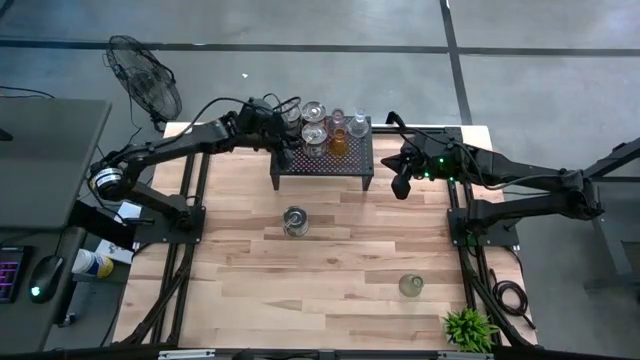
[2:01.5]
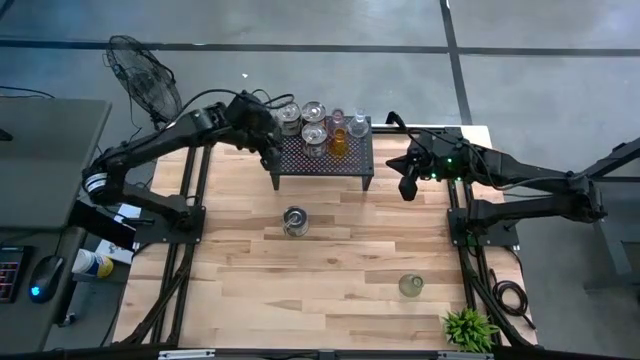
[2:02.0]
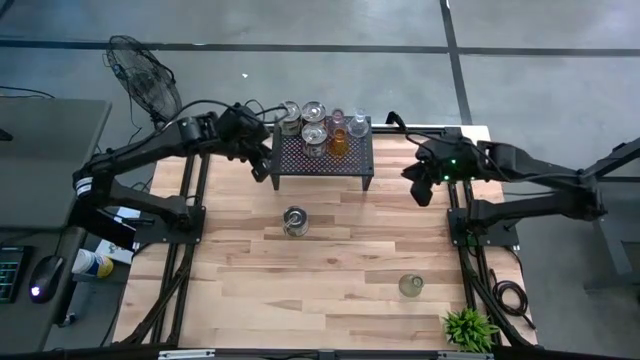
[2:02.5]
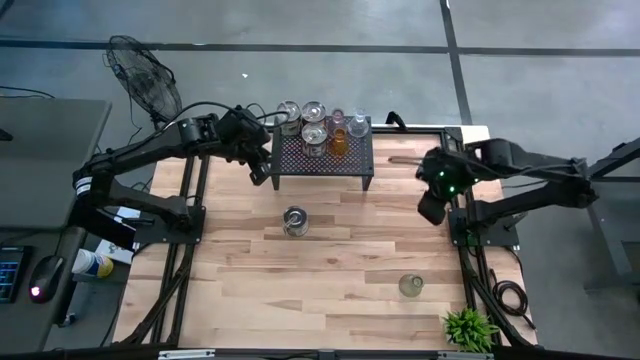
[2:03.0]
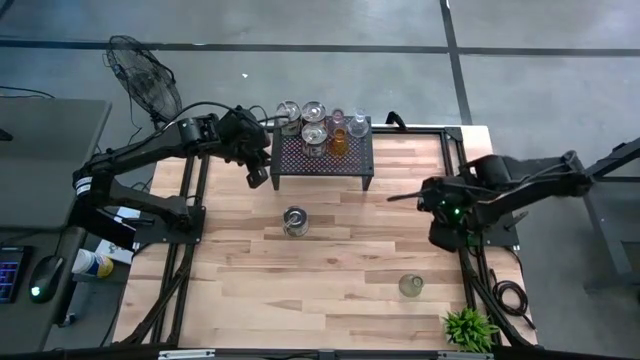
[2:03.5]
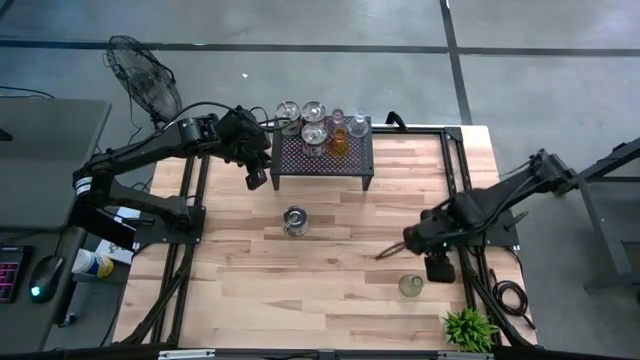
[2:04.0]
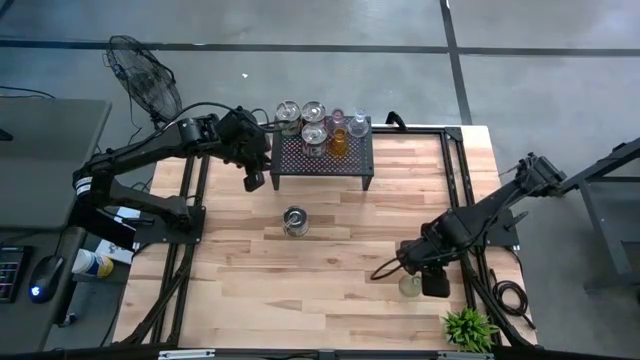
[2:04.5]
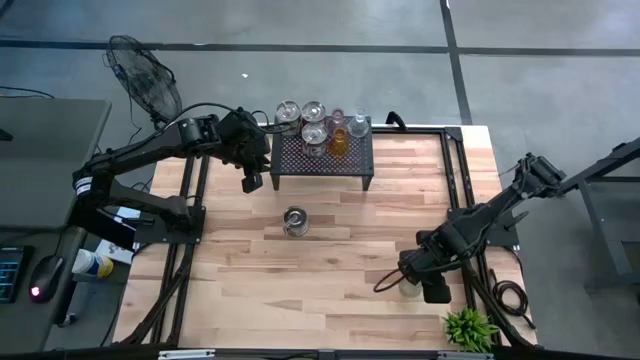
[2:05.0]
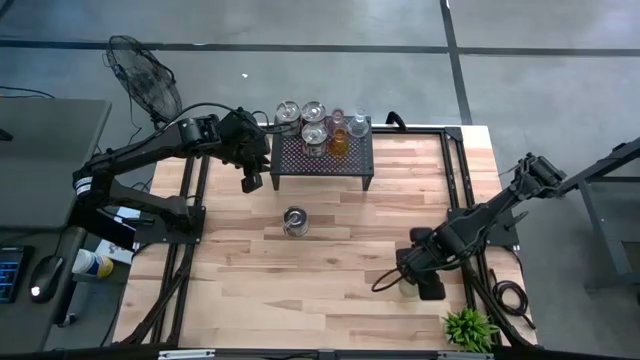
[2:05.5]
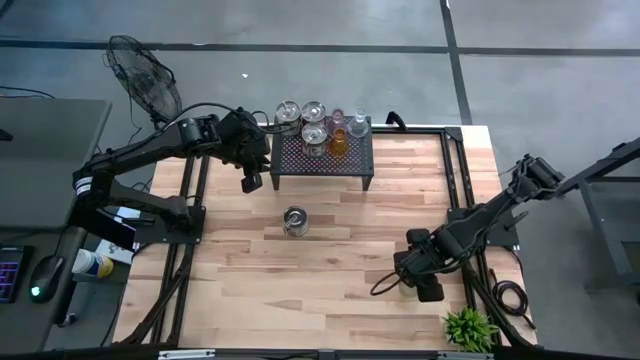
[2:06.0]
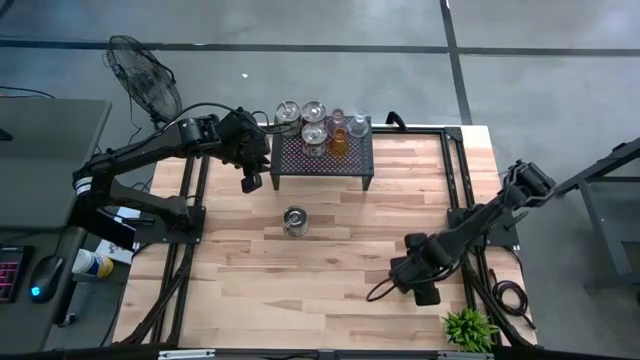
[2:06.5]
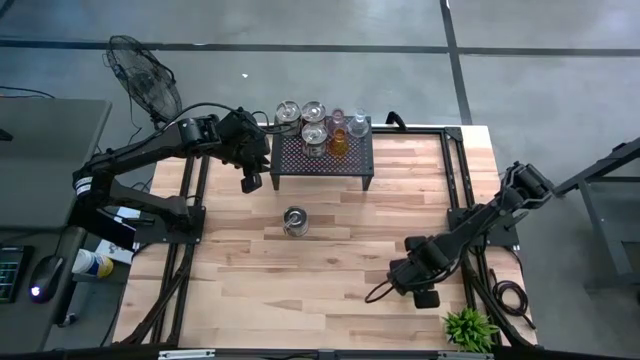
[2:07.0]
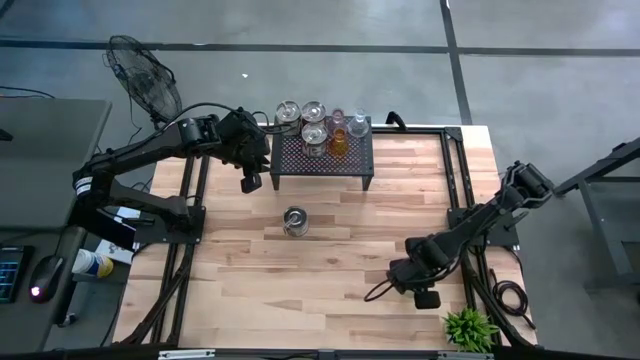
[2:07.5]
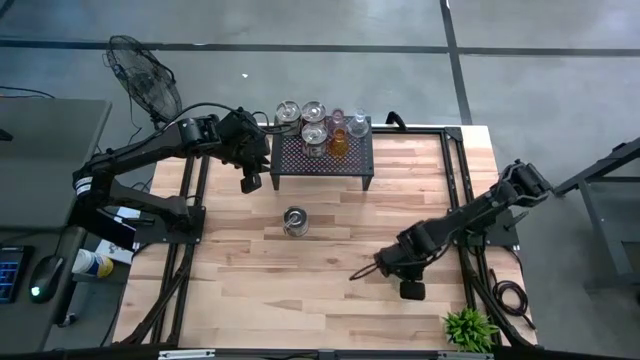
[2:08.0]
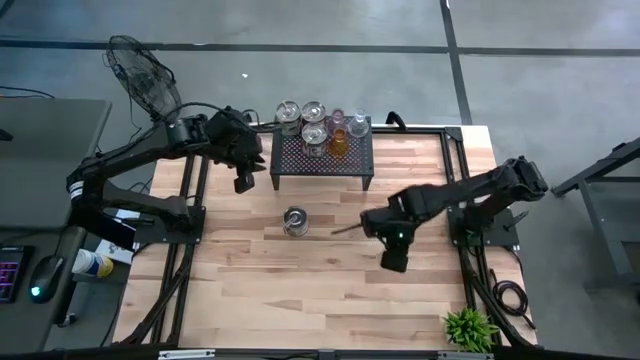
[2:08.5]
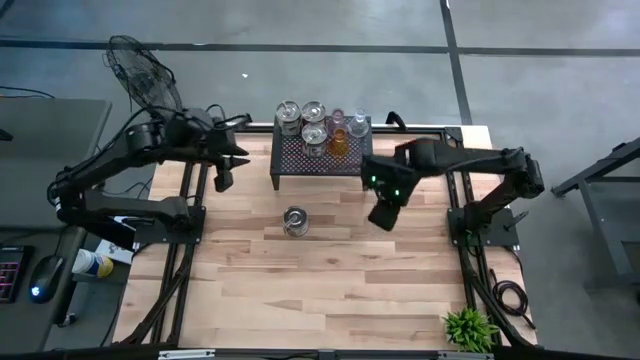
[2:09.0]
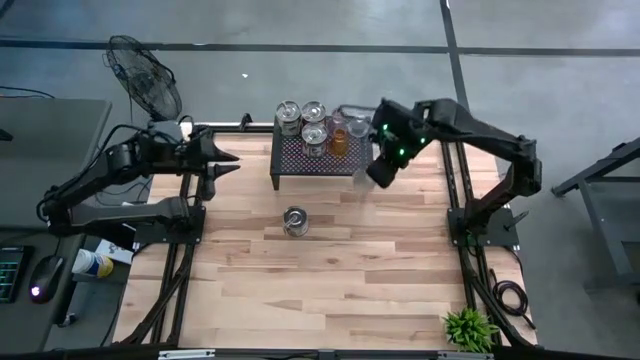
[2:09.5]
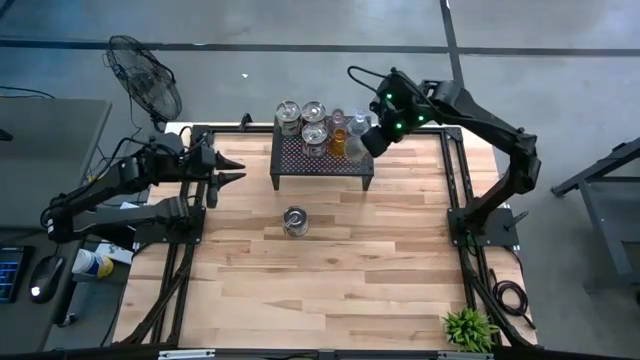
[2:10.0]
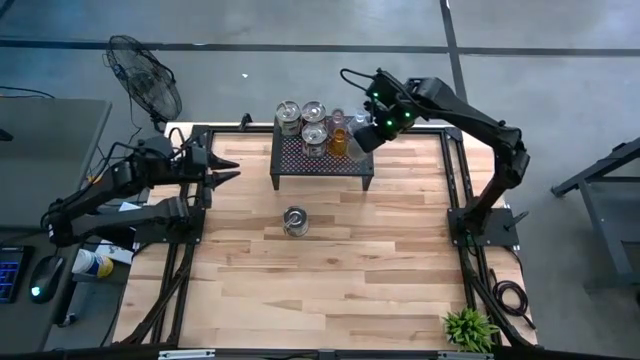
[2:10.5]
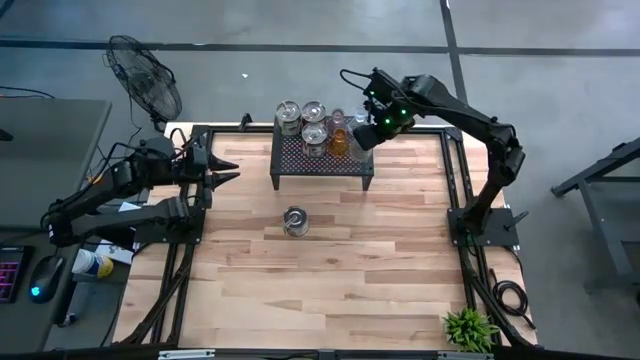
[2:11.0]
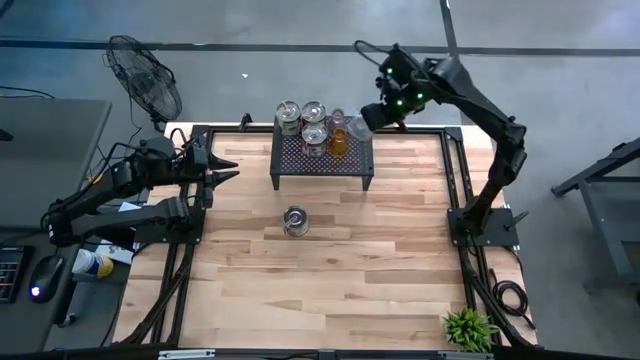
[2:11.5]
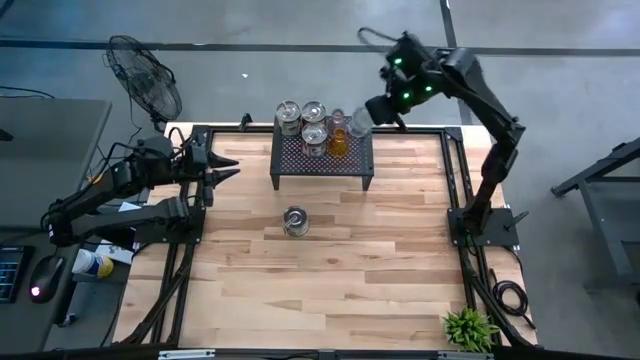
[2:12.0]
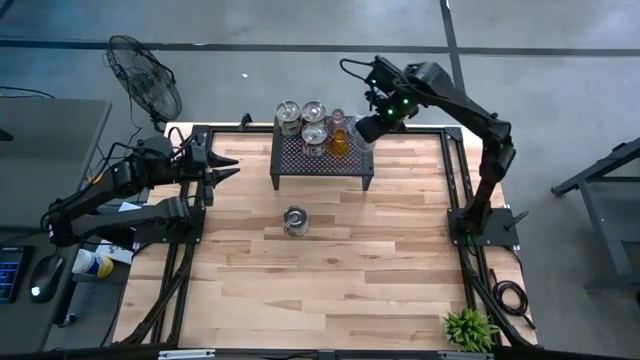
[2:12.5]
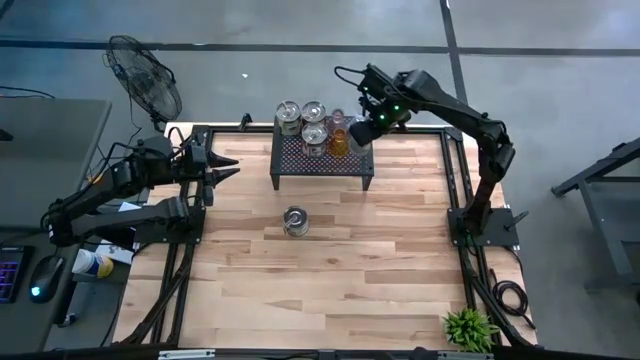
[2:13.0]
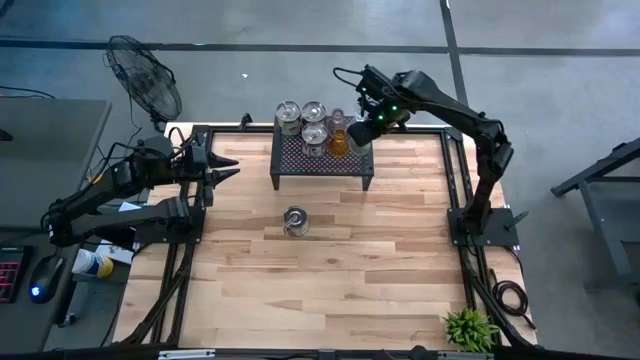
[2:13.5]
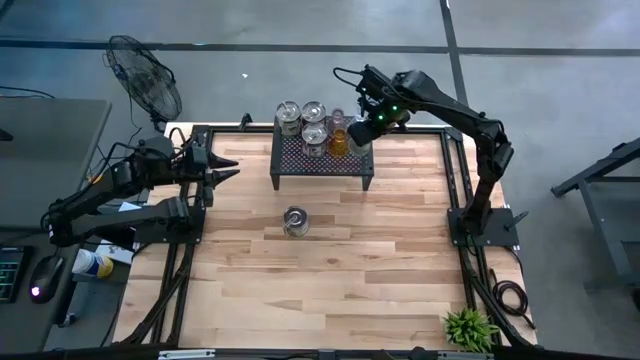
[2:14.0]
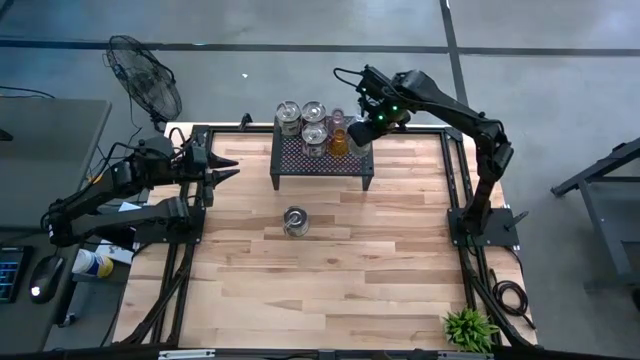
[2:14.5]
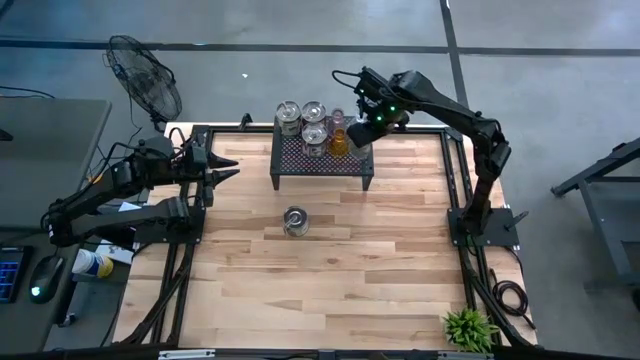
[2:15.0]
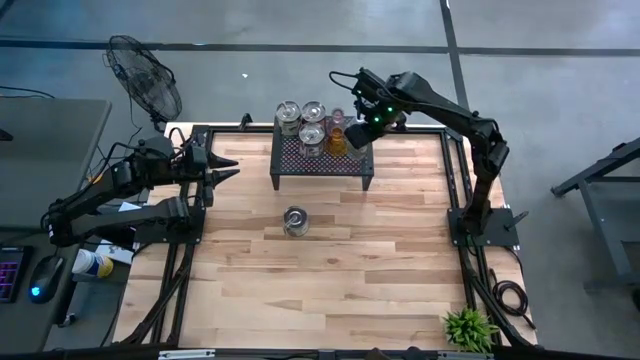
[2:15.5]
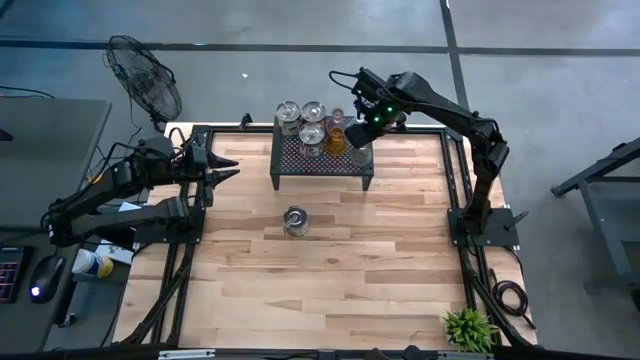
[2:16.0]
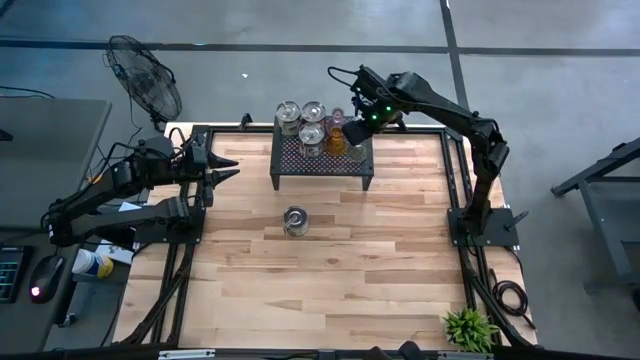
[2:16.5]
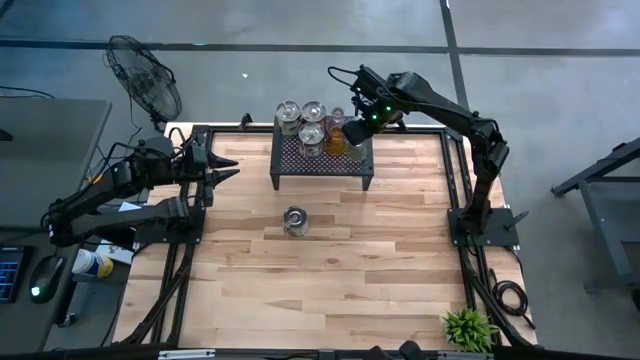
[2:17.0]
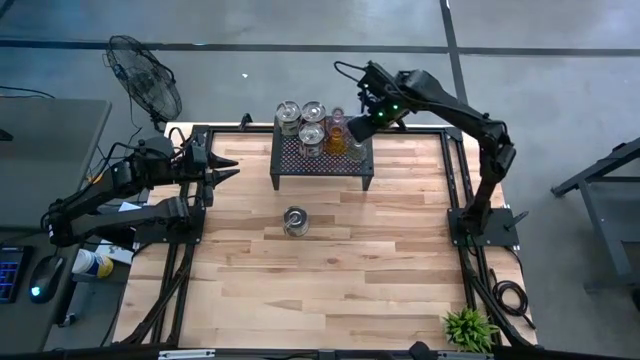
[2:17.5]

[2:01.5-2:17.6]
Task: Pick & Place candle stick holders
Put the green candle holder on the shelf

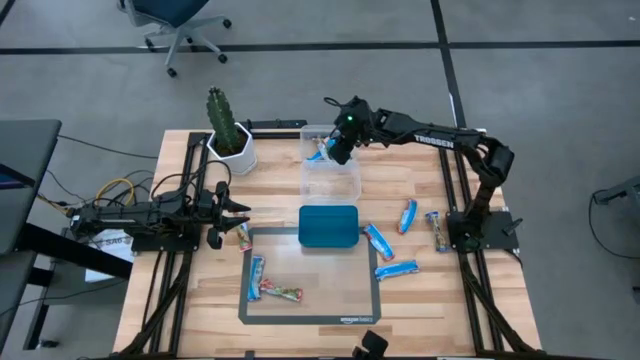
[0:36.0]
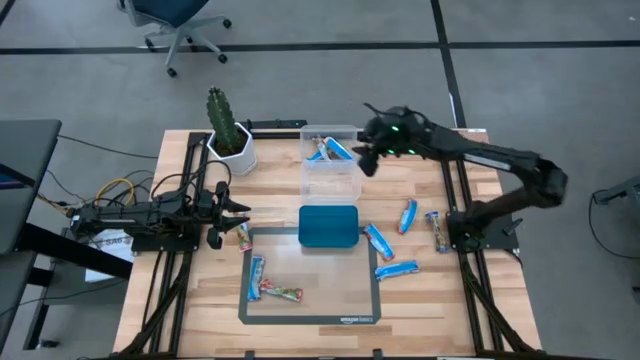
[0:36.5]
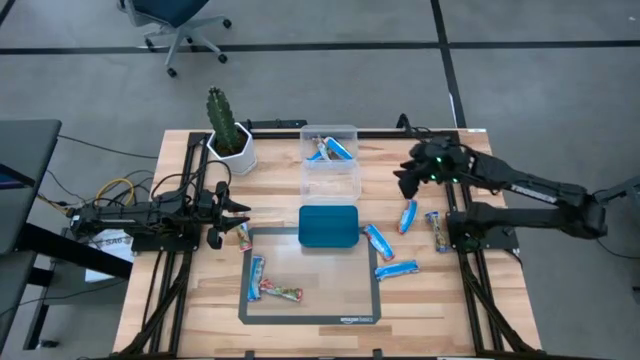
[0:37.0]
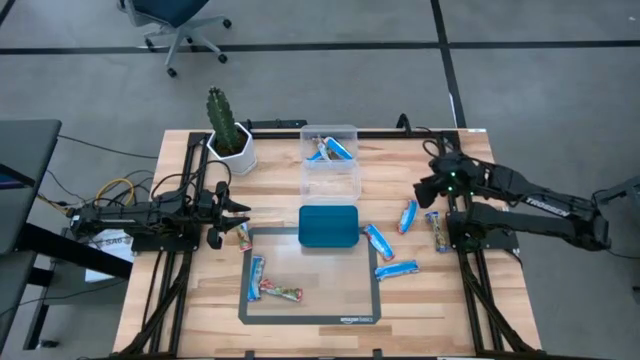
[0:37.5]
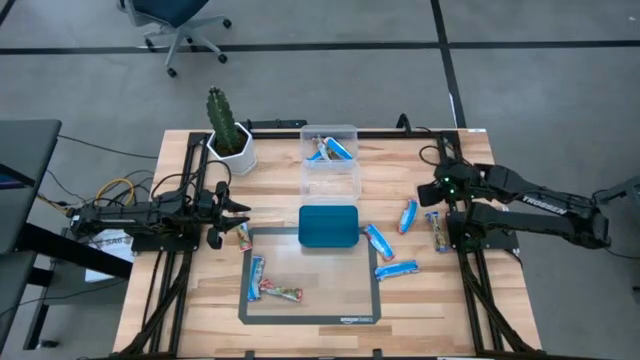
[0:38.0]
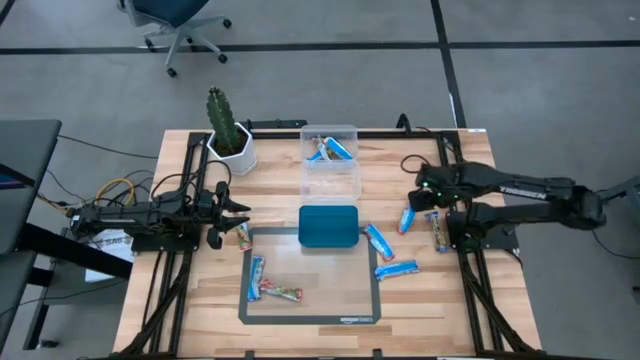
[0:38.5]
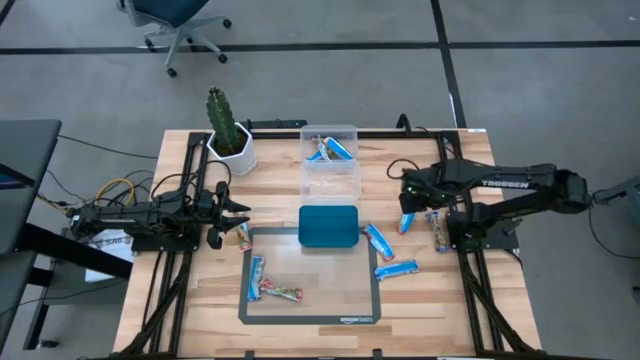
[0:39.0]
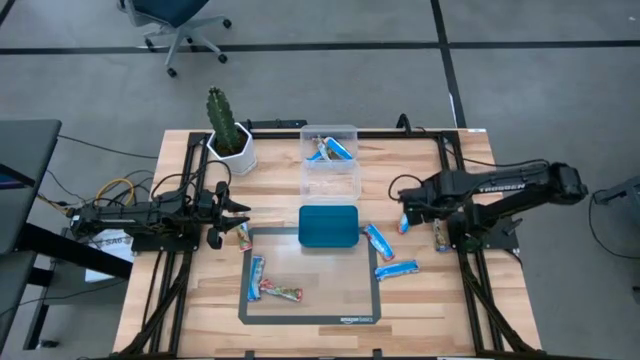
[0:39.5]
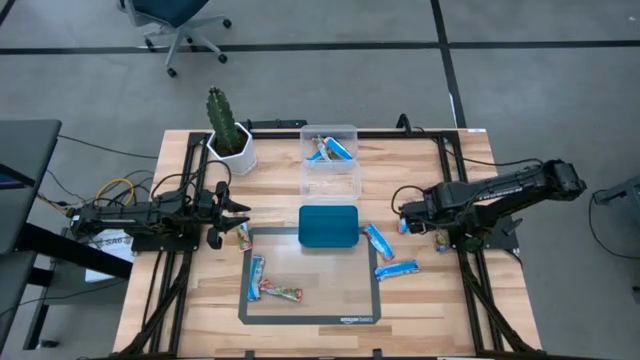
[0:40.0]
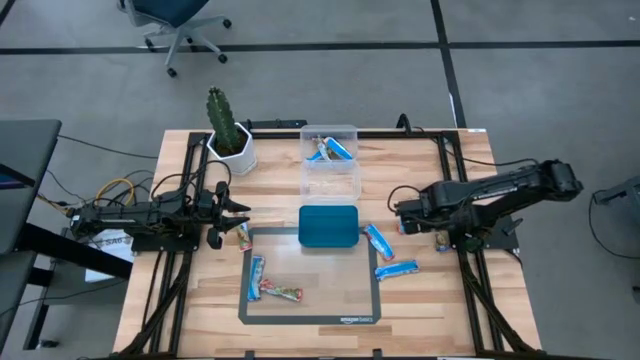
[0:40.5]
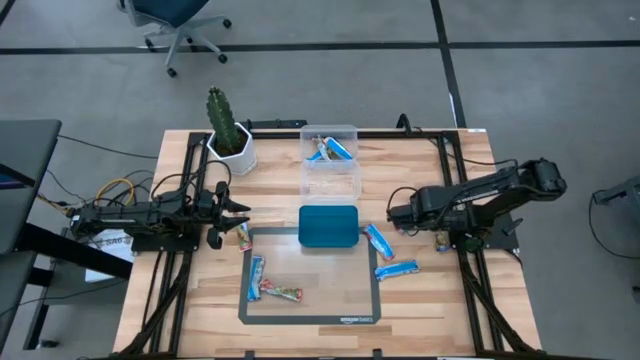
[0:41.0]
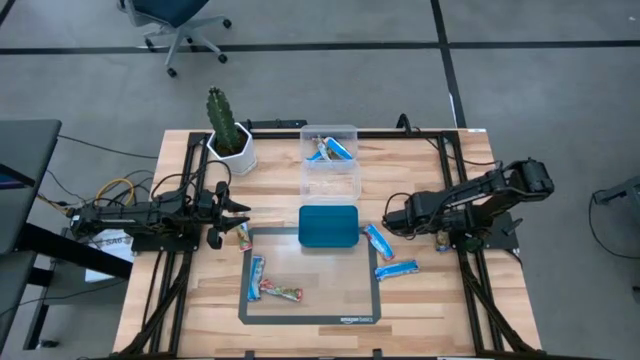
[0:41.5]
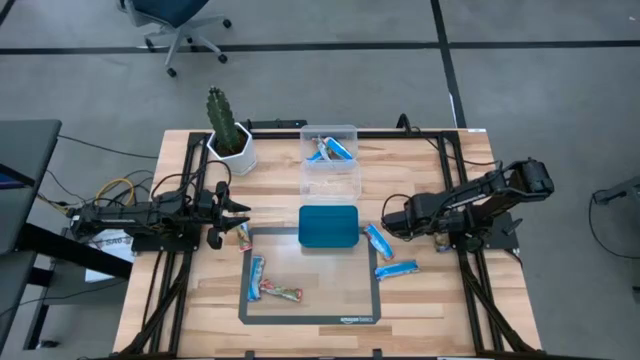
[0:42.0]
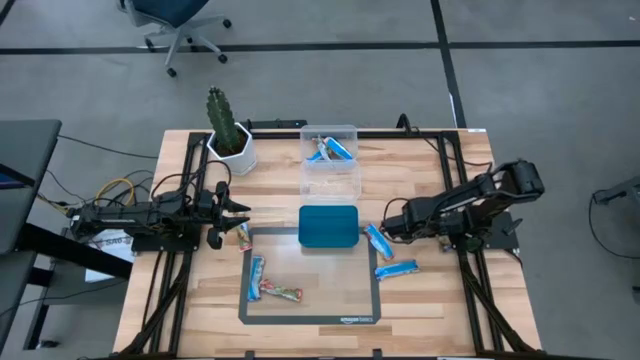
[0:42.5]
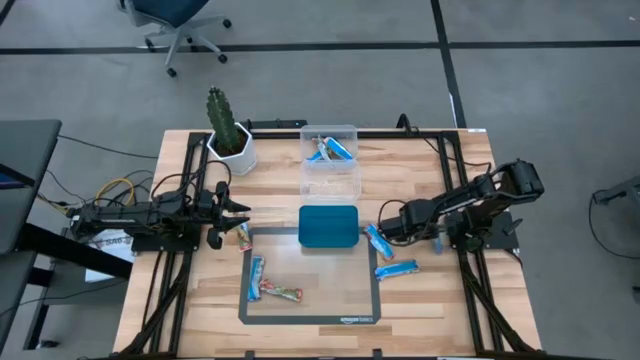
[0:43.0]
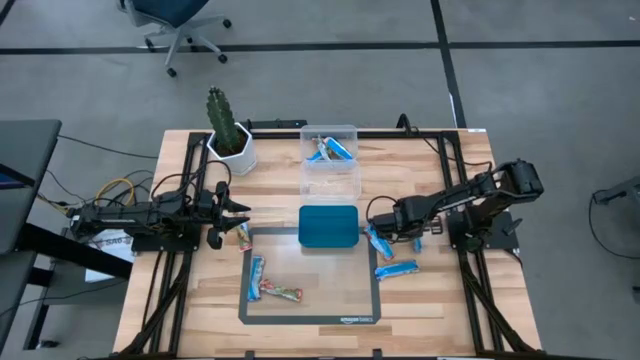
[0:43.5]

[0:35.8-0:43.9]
Task: Pick and place Granola Bars by type
Put the blue granola bar into the bottom transparent bin
